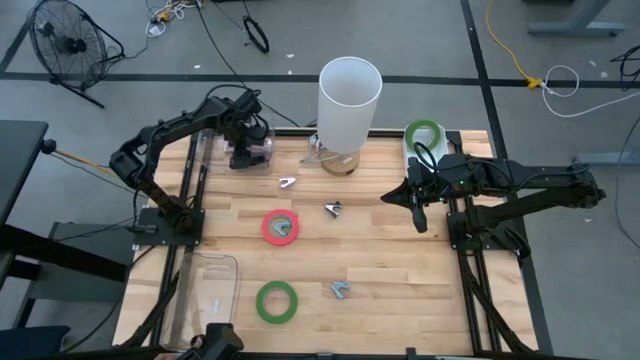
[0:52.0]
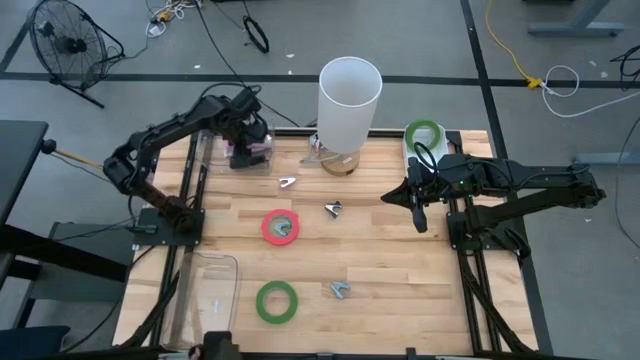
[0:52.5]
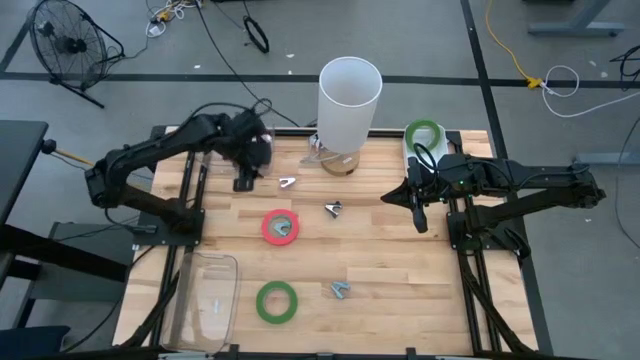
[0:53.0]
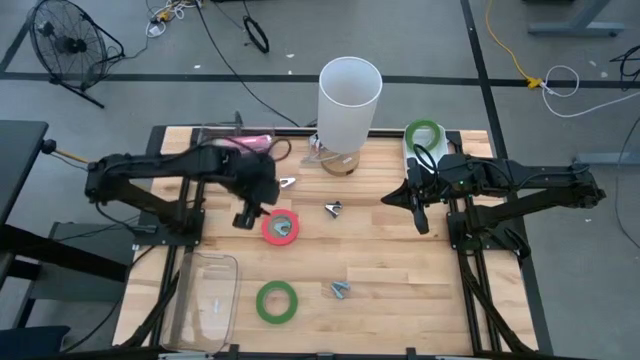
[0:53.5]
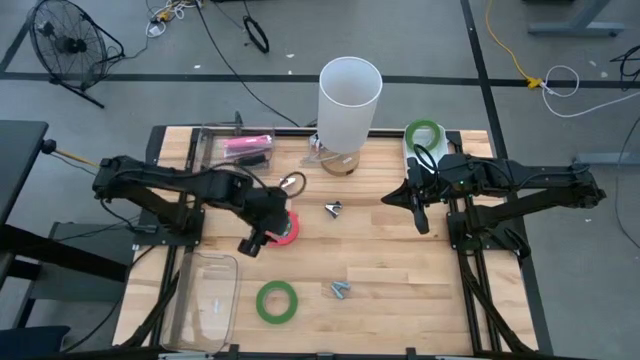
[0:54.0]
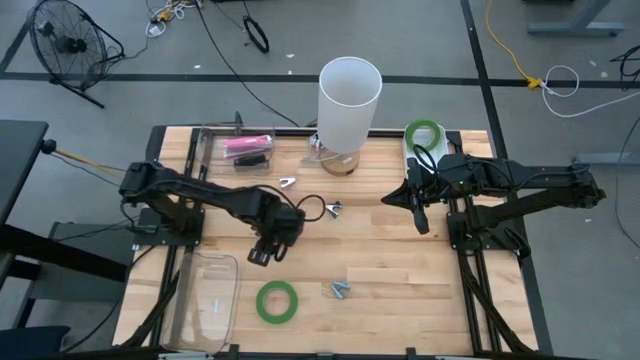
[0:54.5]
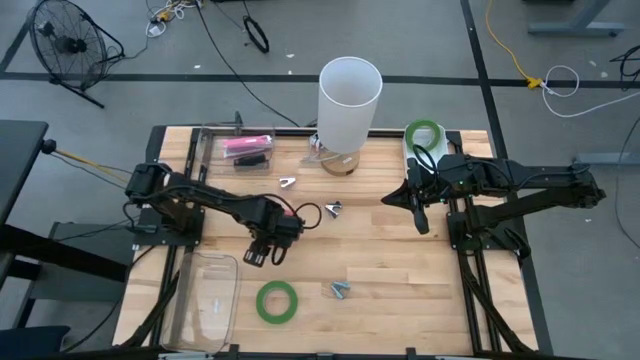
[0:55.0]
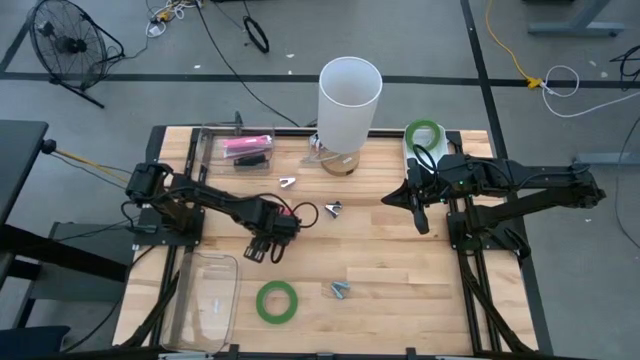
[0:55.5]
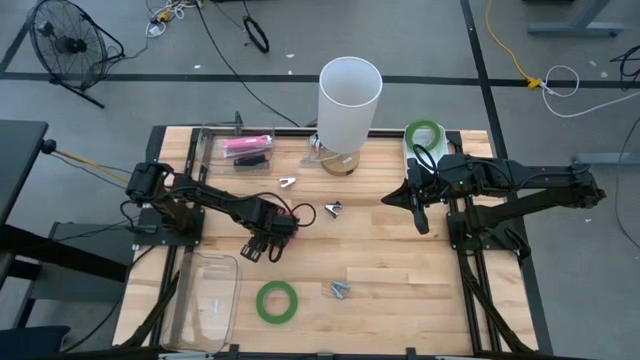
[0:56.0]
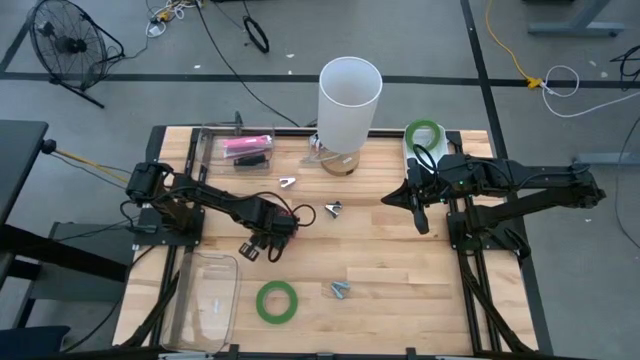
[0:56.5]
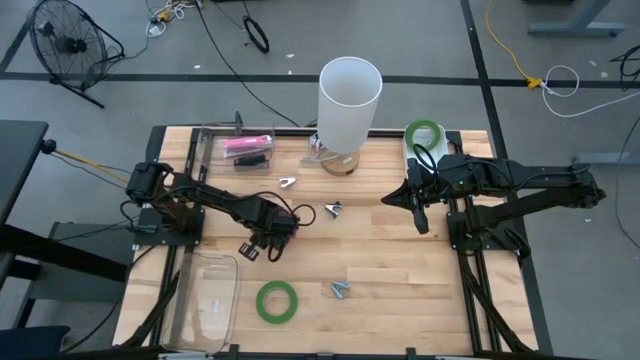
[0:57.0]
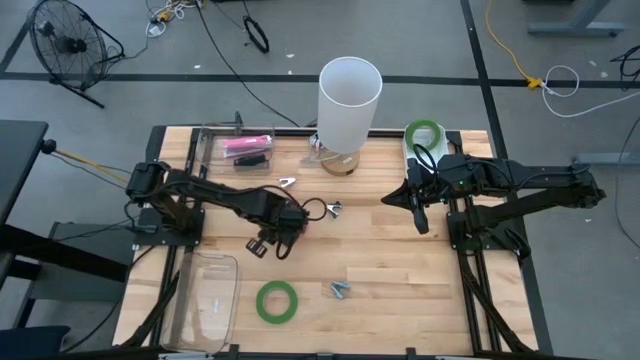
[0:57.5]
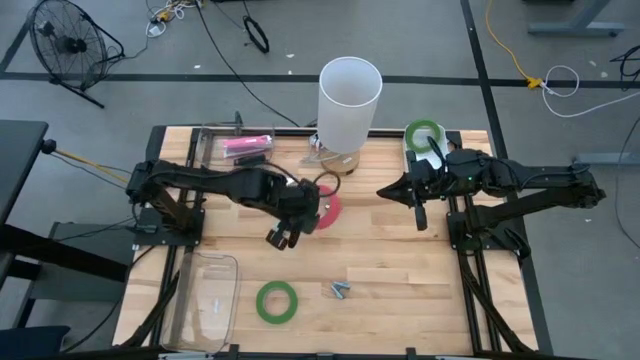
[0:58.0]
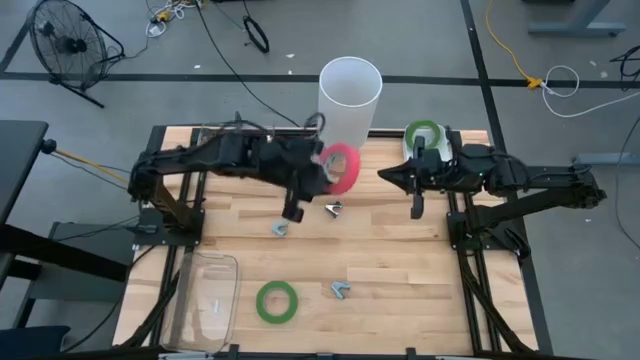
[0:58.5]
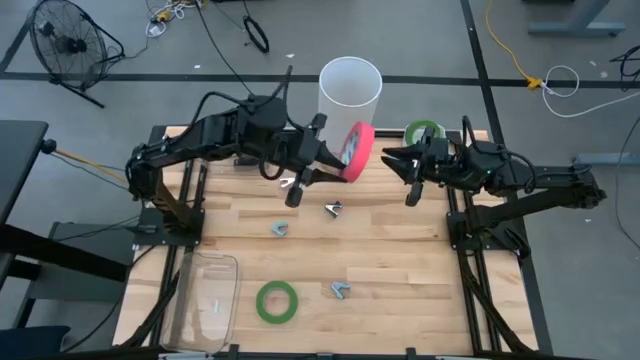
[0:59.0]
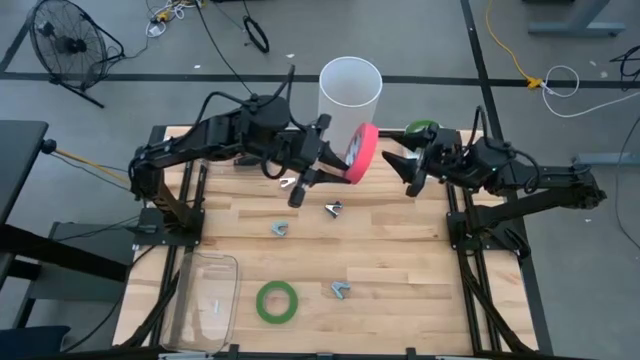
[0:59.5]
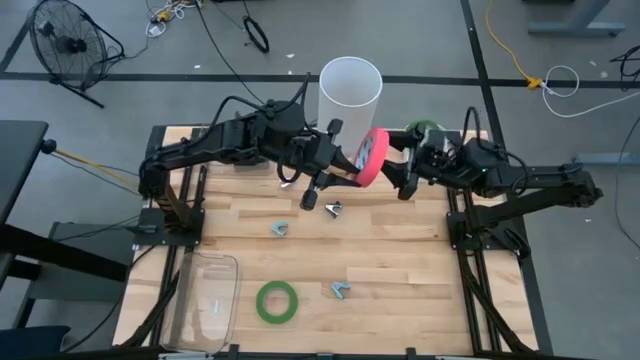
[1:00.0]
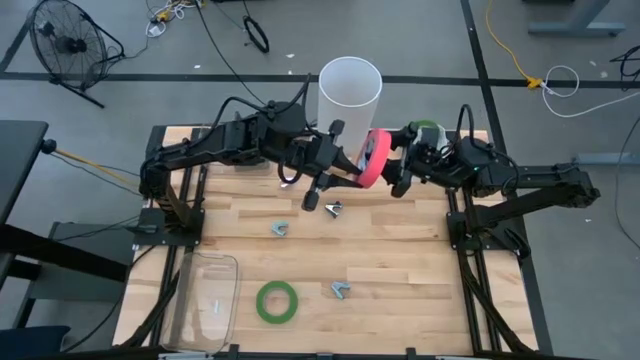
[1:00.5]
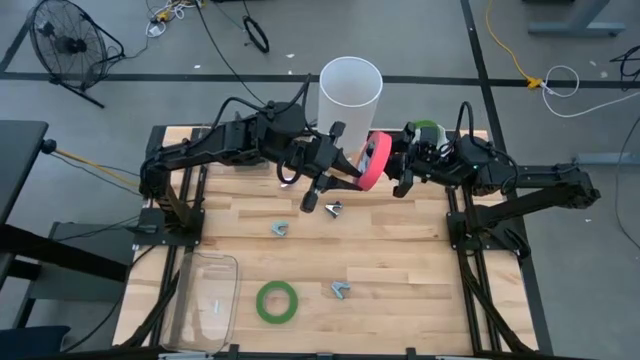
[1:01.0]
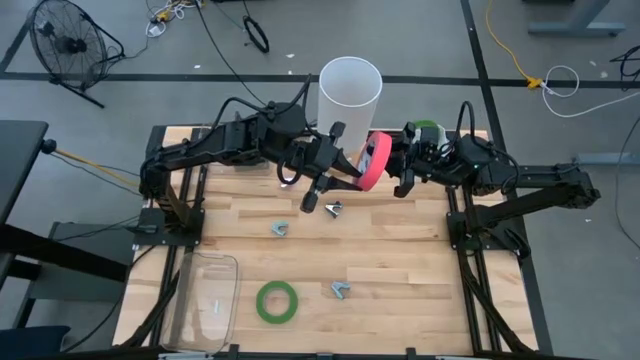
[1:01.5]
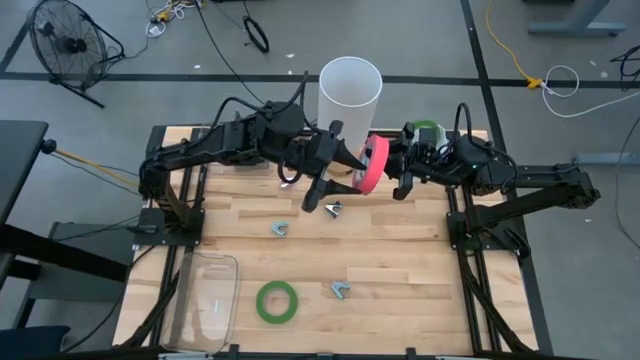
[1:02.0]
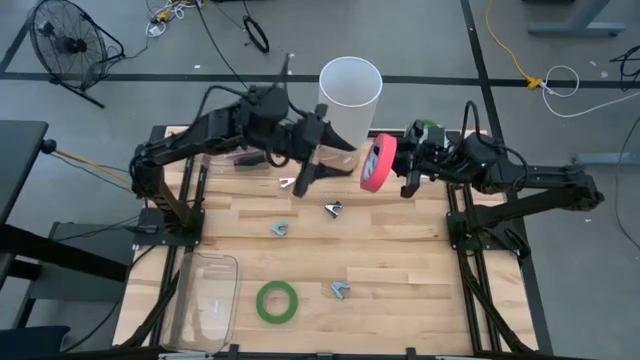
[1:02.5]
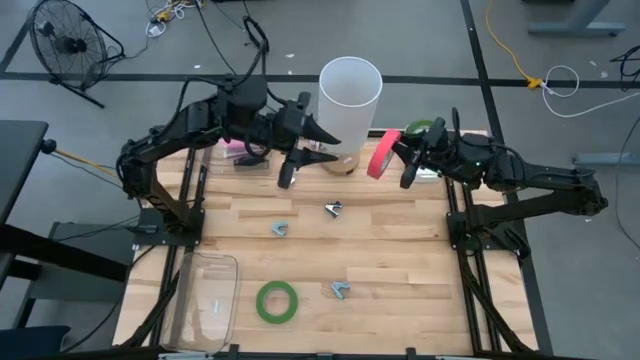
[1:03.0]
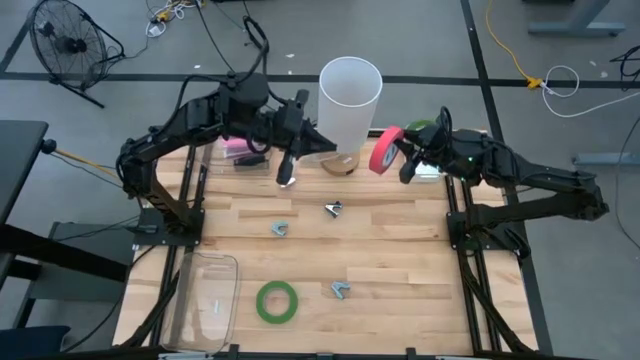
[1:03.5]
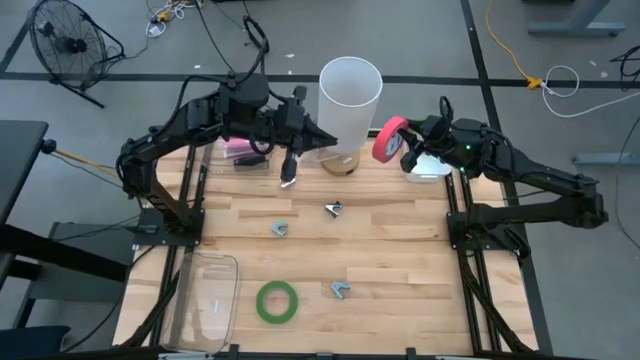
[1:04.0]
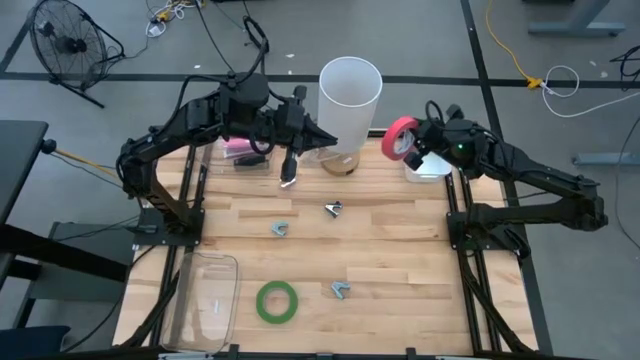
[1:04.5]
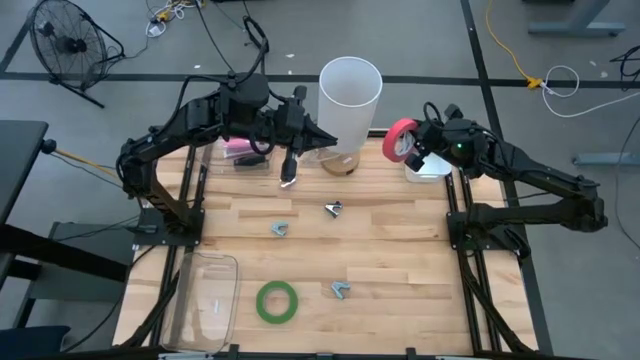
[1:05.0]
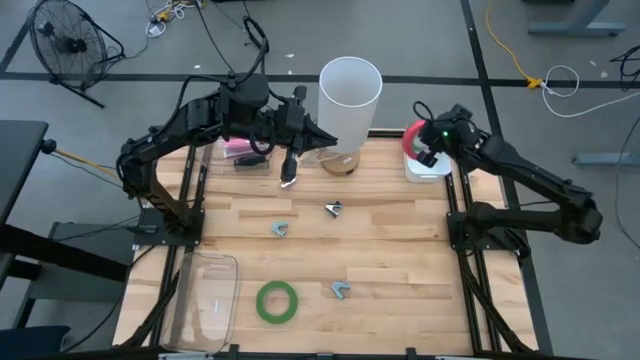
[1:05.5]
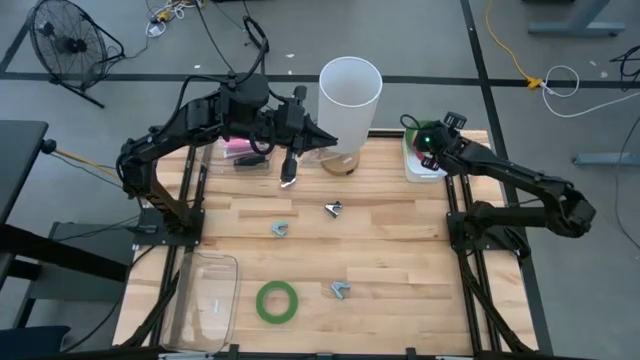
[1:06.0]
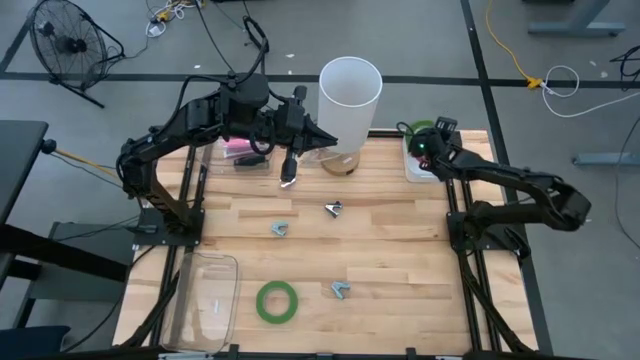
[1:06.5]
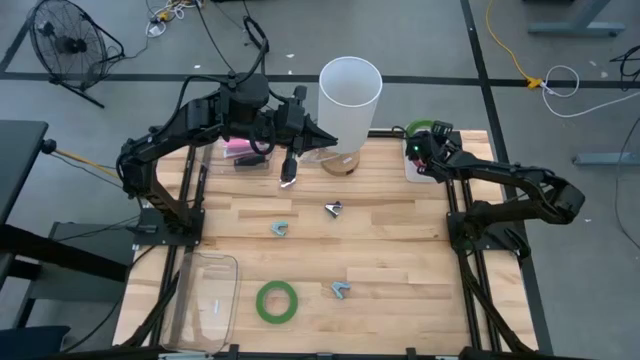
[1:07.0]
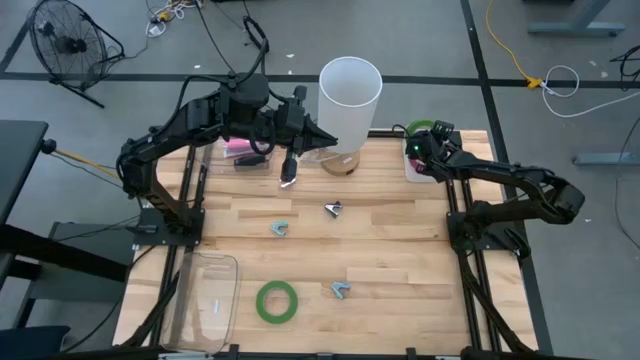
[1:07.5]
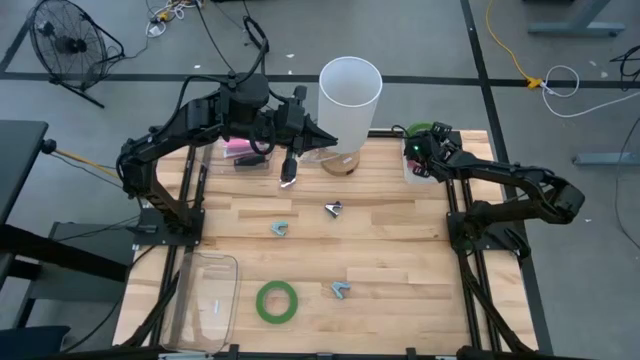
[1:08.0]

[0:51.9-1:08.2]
Task: Pick and place Stapler, Stapler remover, tape
Put the pink tape into the white bin
